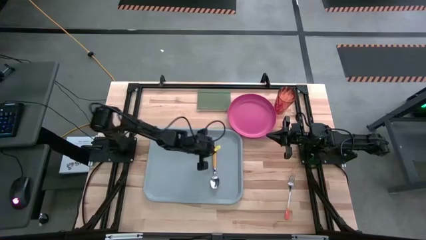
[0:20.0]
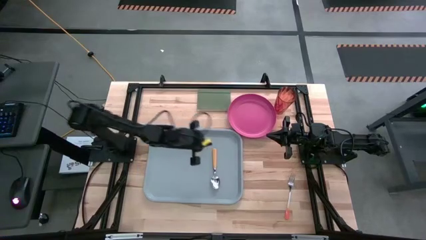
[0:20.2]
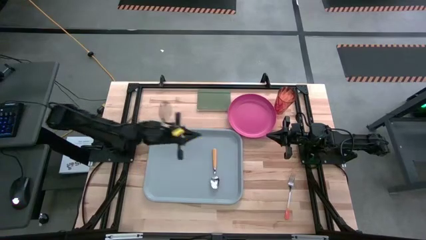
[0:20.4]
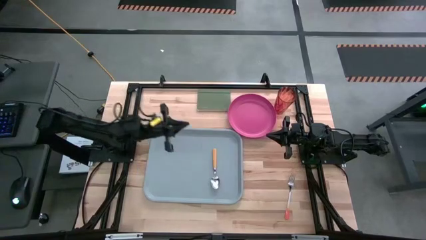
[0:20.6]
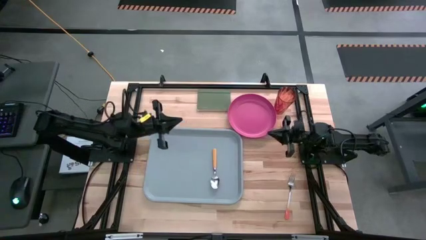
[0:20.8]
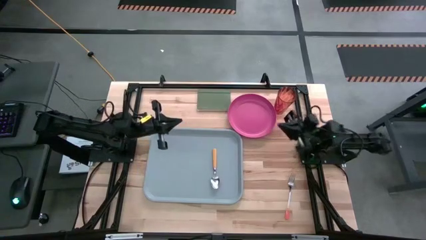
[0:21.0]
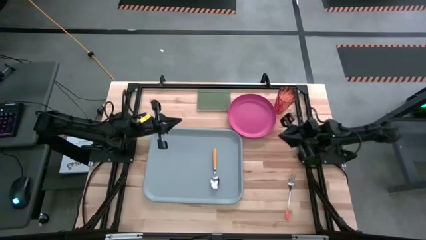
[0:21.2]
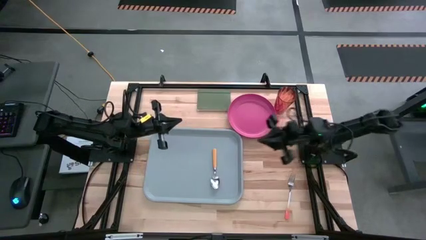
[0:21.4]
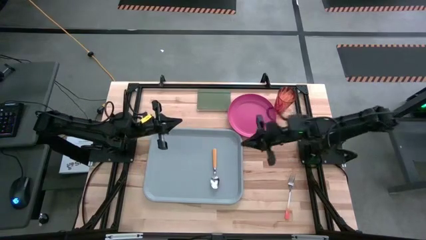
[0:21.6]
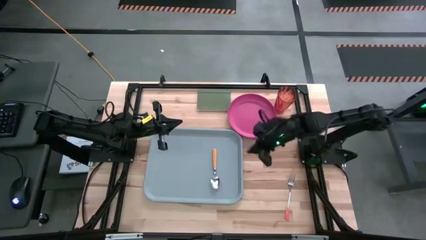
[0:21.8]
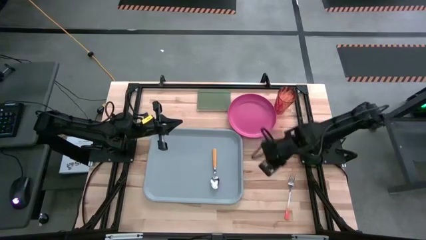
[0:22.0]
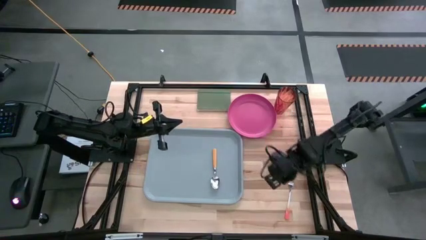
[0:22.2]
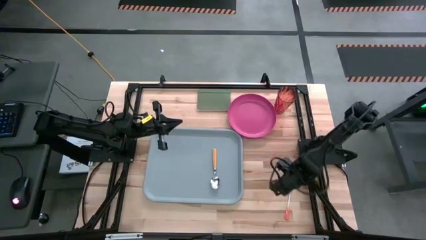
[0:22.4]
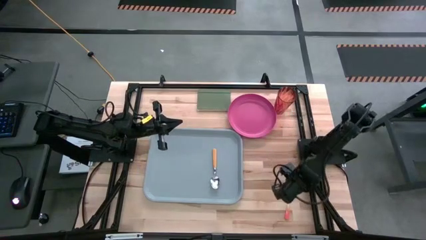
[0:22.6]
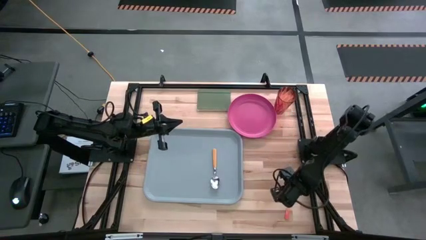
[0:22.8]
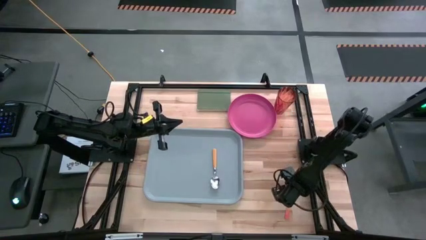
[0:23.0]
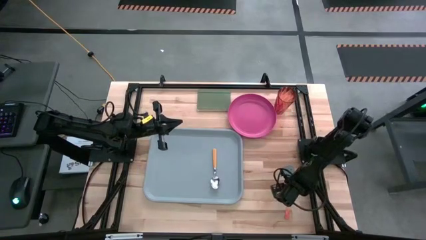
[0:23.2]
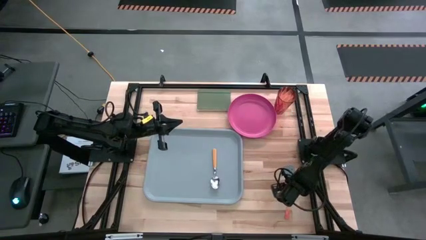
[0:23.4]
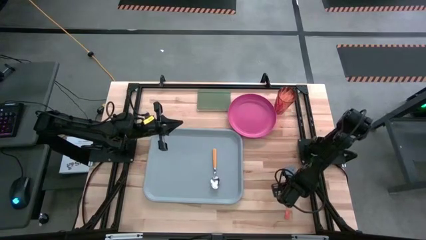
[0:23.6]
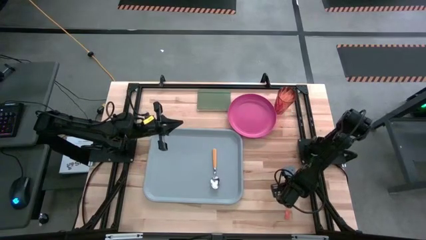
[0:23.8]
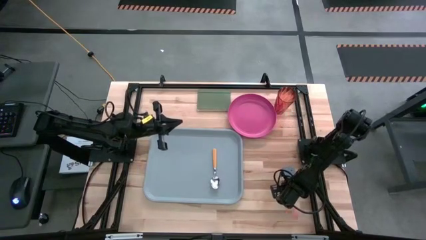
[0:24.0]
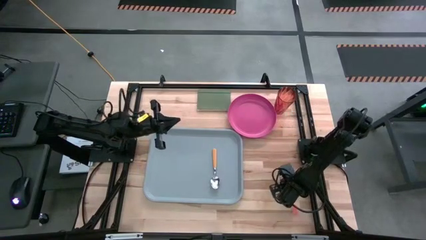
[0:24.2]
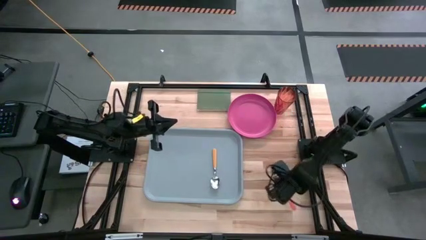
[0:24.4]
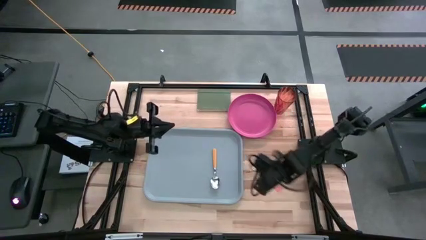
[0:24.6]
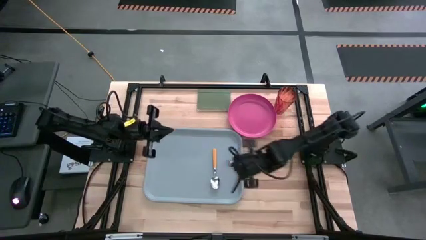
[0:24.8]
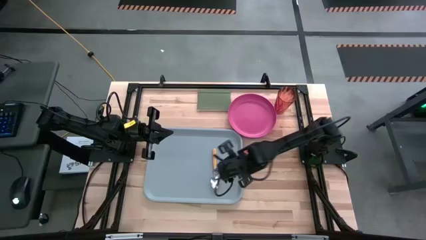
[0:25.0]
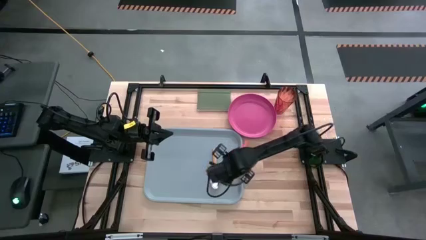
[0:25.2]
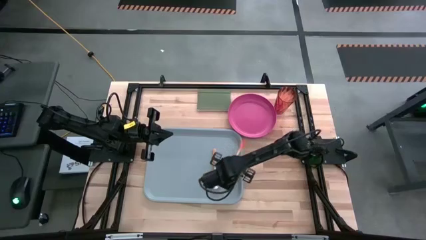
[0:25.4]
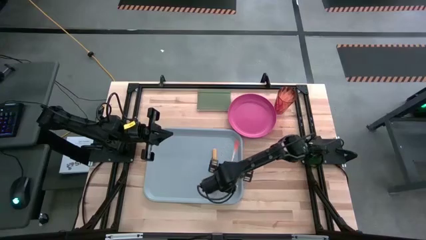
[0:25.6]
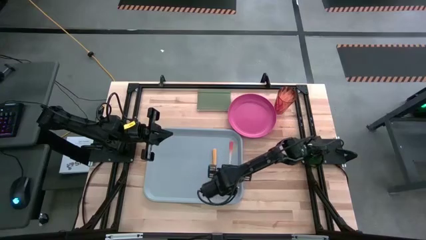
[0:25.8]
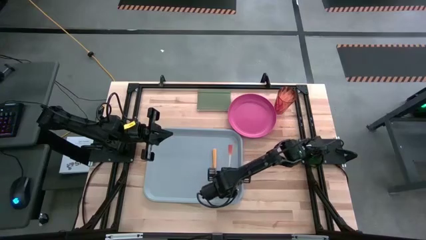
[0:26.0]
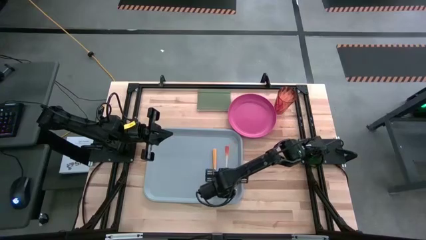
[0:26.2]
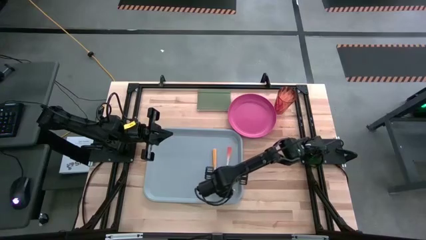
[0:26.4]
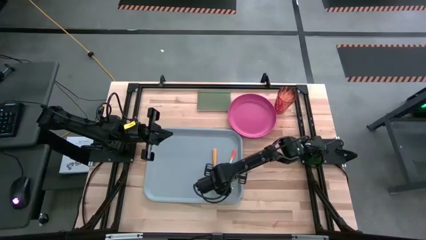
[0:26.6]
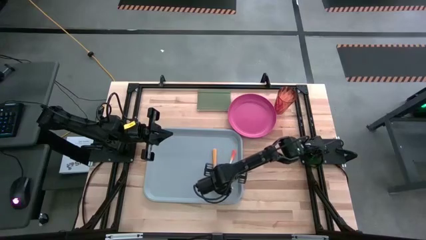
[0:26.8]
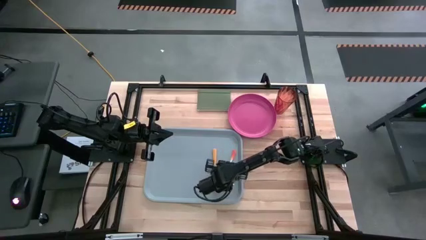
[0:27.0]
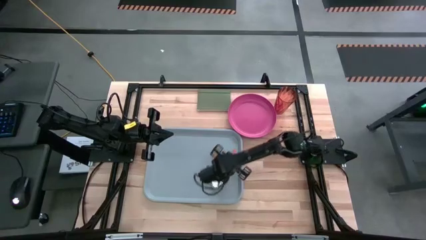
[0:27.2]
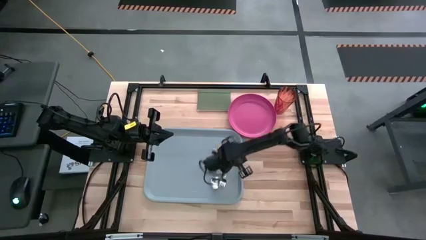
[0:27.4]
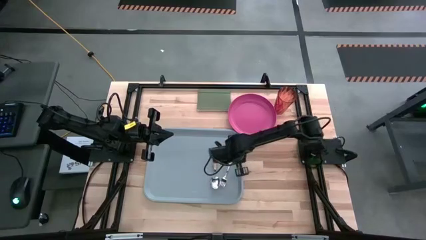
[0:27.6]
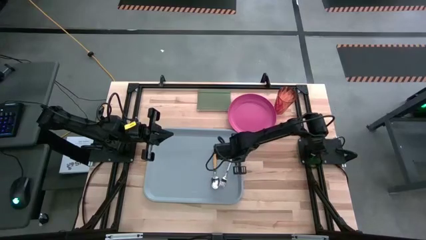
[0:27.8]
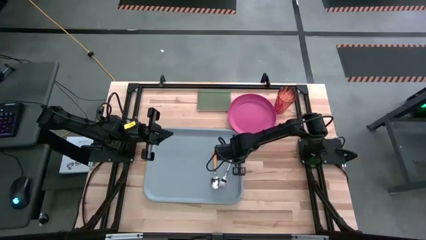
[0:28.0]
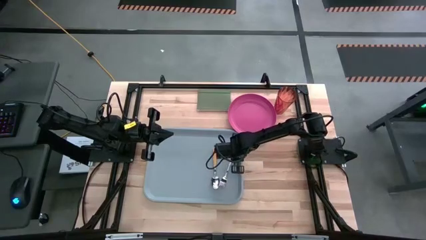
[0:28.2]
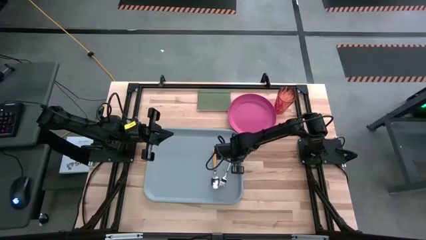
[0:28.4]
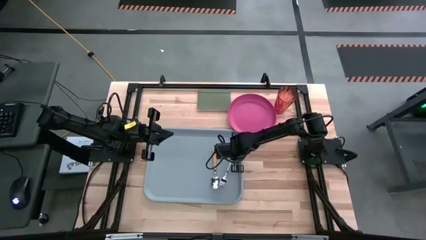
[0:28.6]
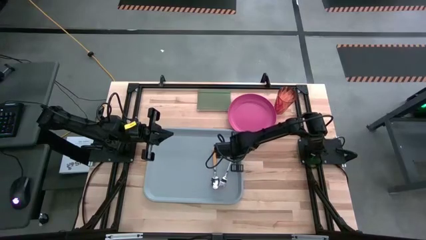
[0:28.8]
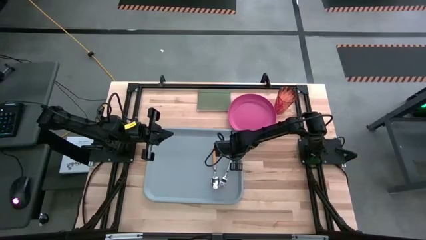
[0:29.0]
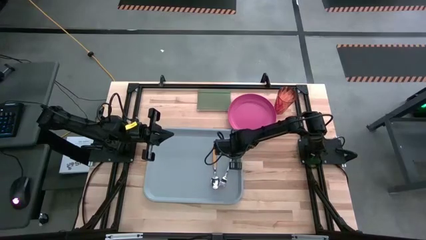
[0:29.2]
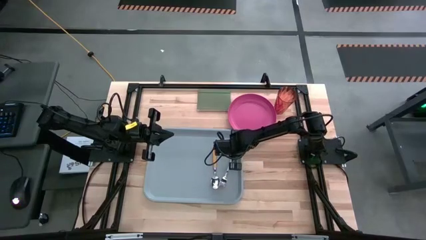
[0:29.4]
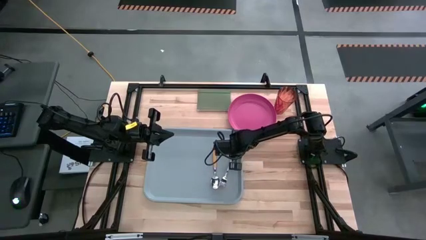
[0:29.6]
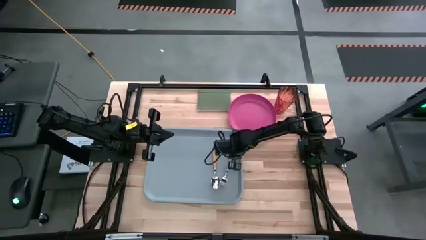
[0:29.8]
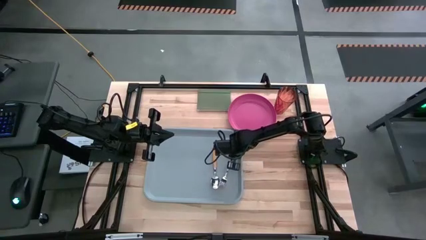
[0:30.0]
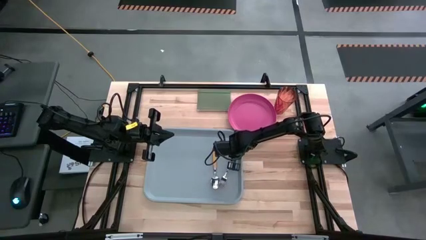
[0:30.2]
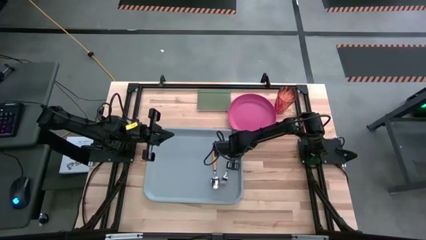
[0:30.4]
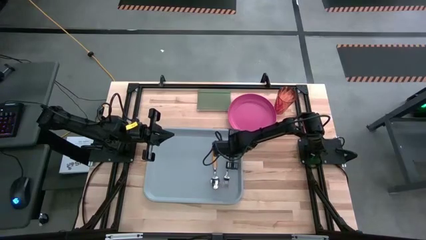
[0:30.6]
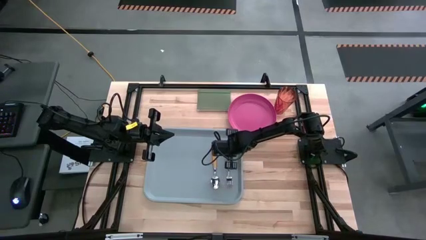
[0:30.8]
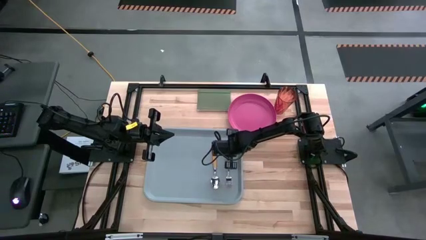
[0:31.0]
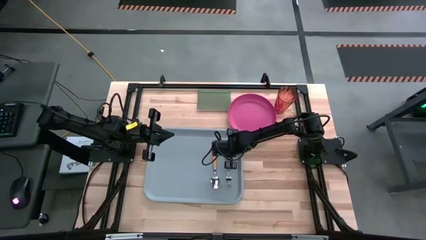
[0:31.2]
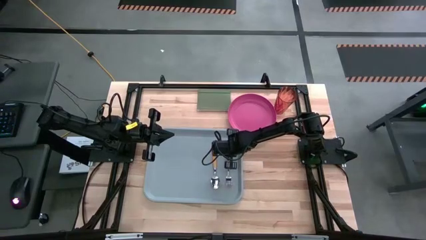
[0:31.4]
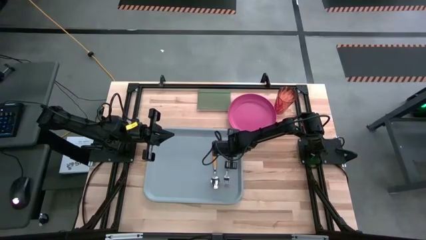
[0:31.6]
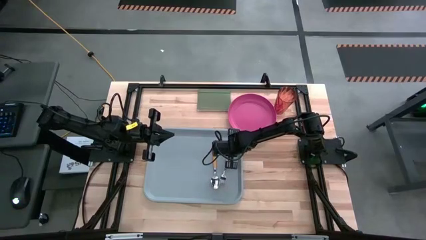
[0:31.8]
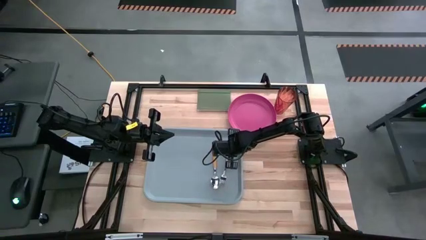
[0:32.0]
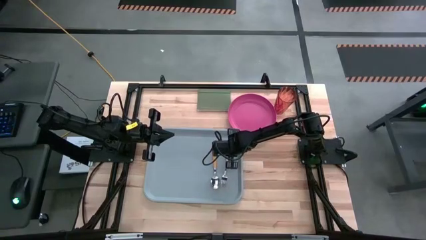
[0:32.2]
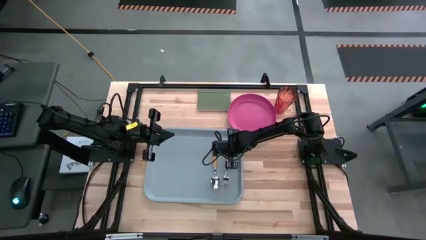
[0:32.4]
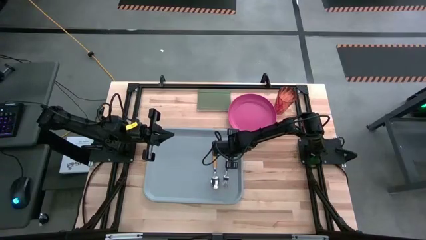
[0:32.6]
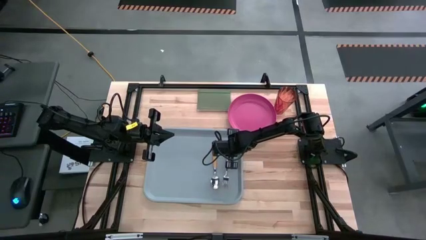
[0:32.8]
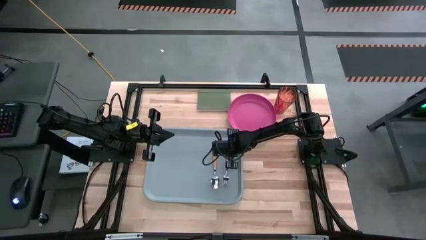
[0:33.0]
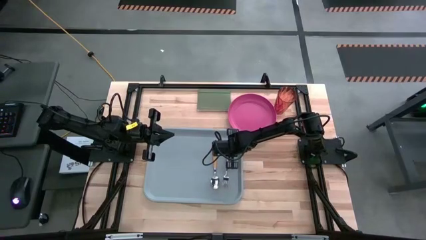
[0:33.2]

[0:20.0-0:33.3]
Task: Pick and place plate/cup/fork/spoon on tray
Put the orange fork on the gray tray to the left of the yellow spoon

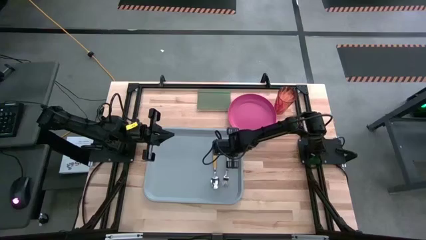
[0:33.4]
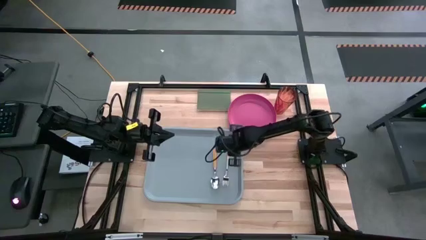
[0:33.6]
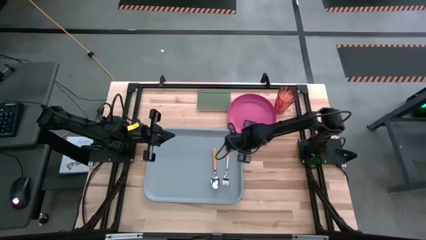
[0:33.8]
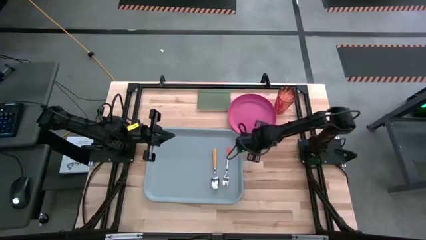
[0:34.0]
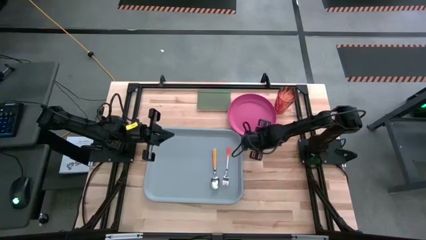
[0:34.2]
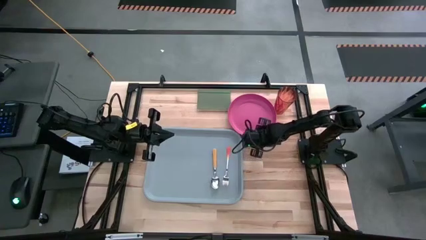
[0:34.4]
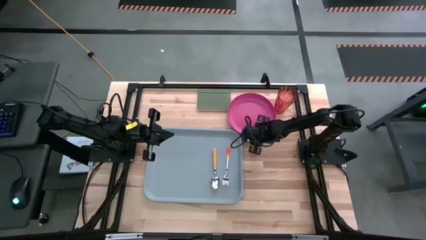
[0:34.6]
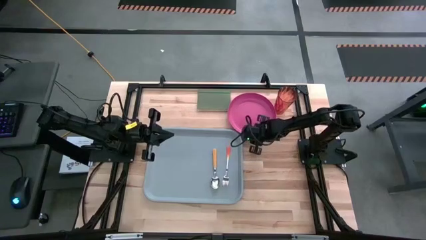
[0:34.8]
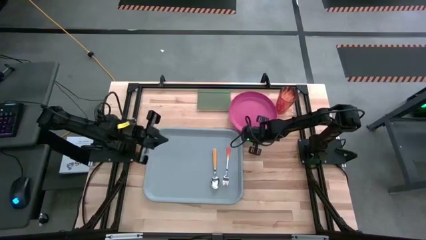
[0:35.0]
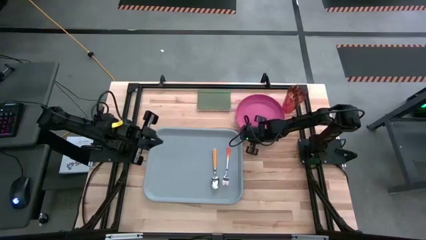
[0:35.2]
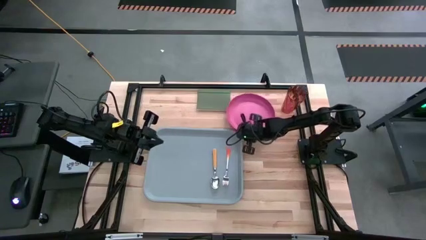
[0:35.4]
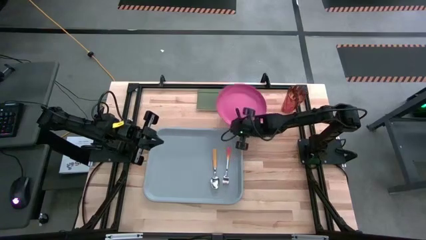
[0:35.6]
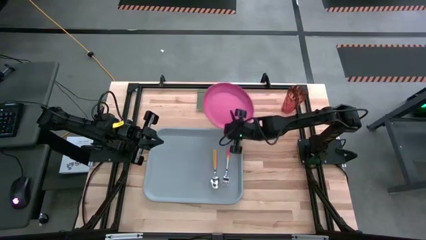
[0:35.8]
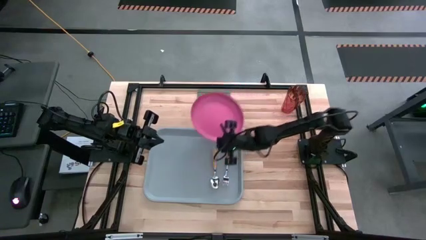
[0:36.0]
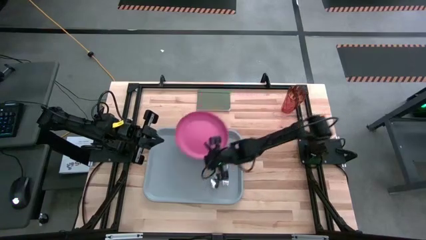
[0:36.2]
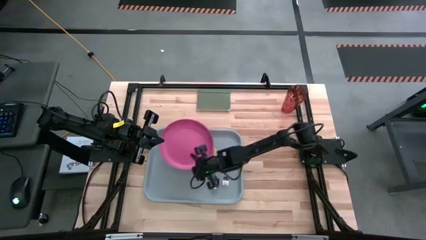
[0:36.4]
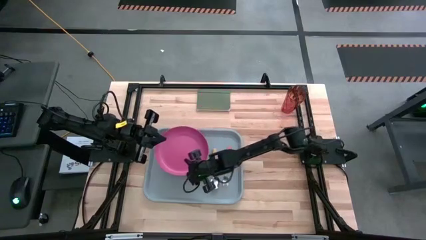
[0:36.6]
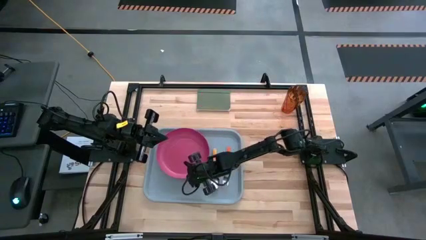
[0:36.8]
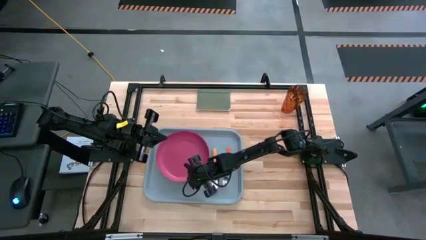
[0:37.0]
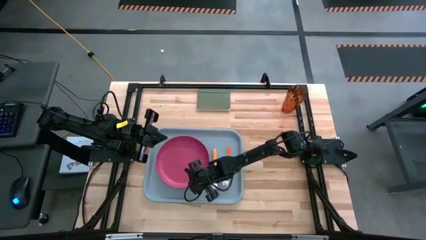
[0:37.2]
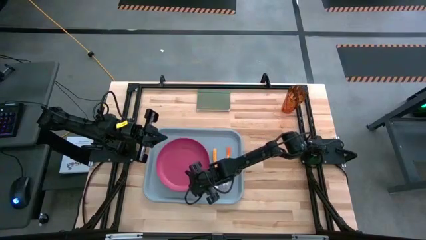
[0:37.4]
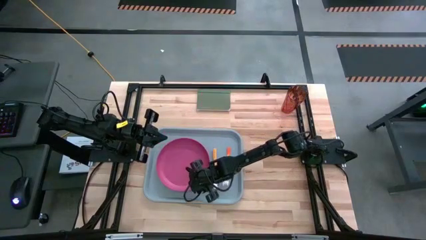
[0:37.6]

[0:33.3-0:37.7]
Put the pink plate on the gray tray to the right of the yellow spoon
